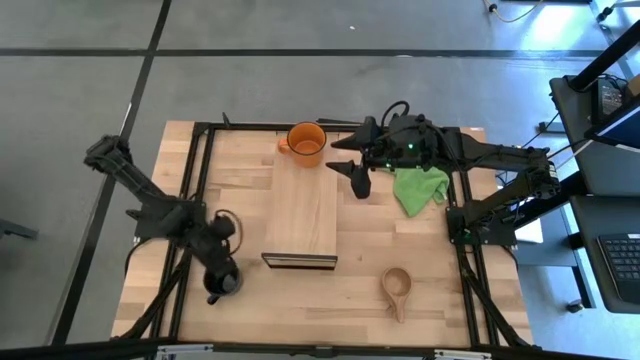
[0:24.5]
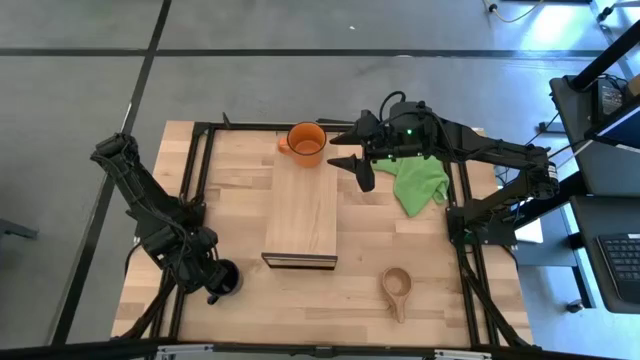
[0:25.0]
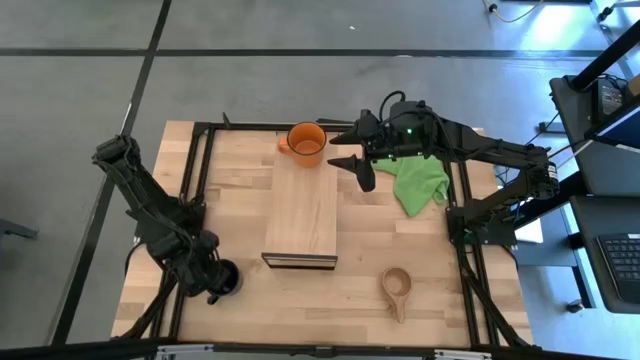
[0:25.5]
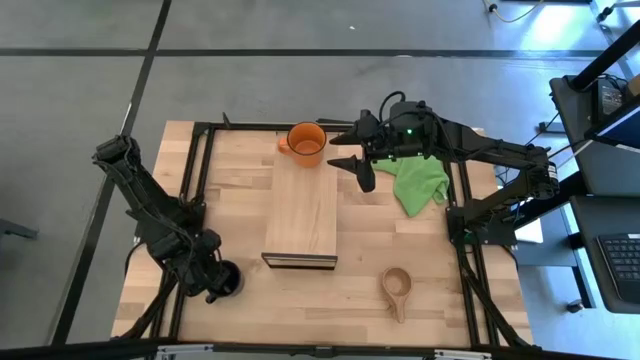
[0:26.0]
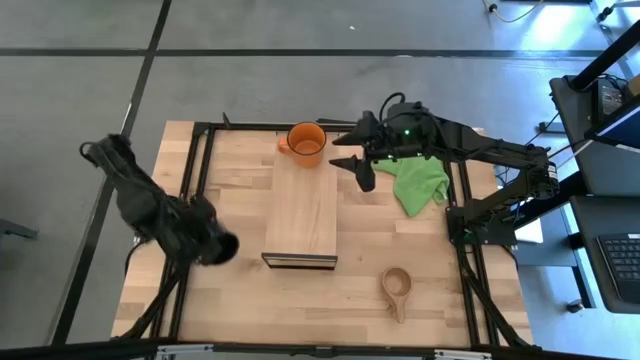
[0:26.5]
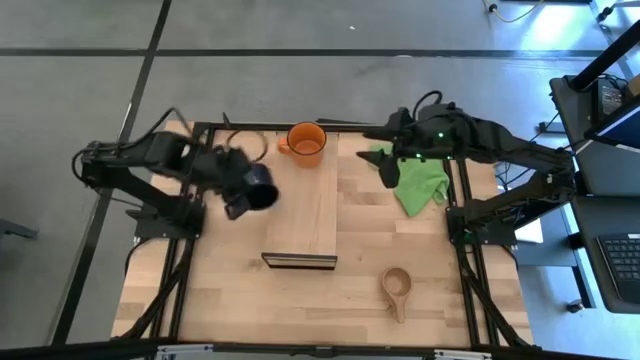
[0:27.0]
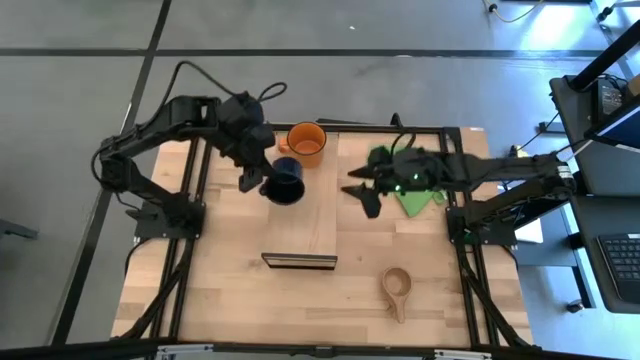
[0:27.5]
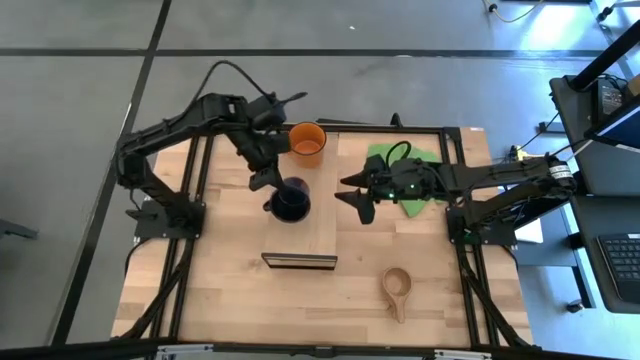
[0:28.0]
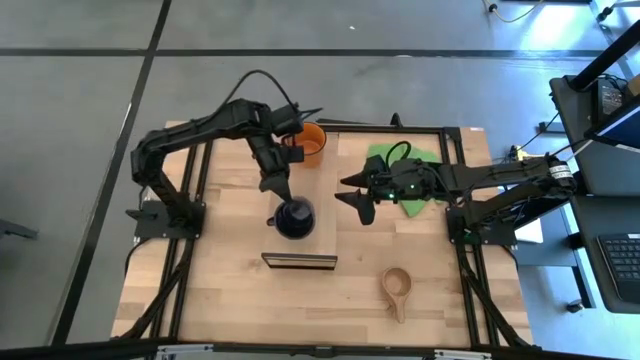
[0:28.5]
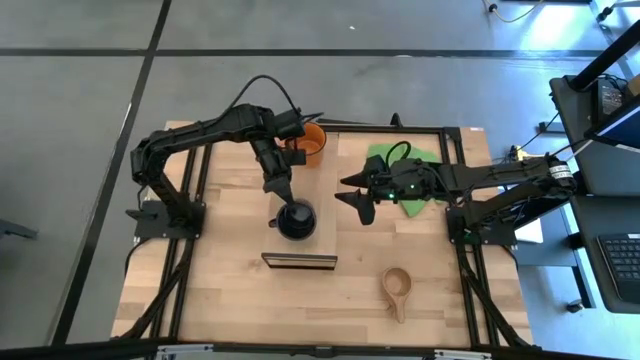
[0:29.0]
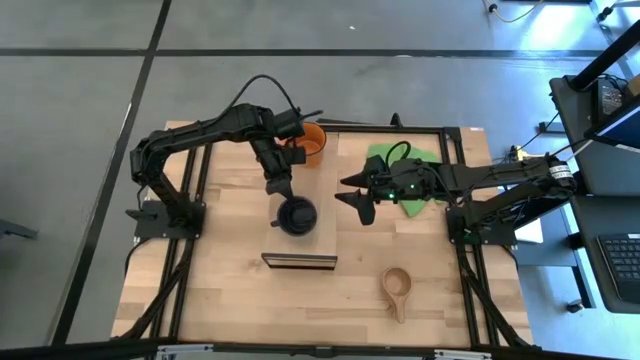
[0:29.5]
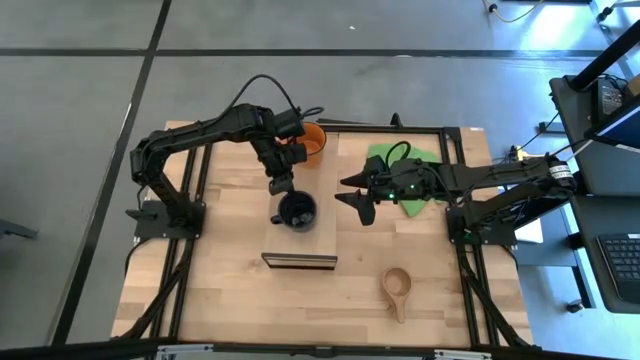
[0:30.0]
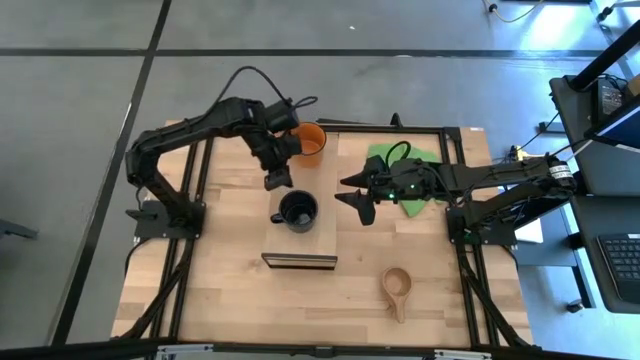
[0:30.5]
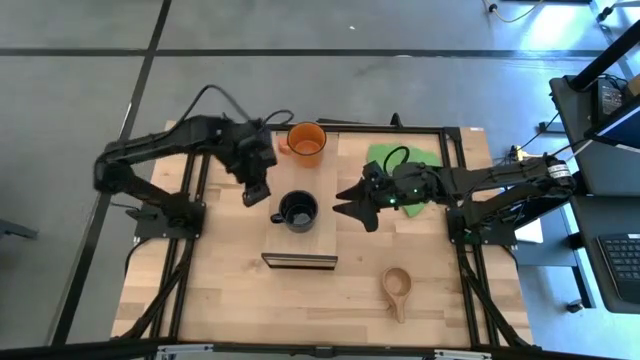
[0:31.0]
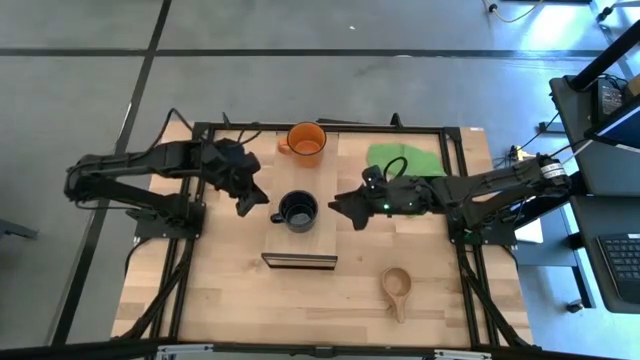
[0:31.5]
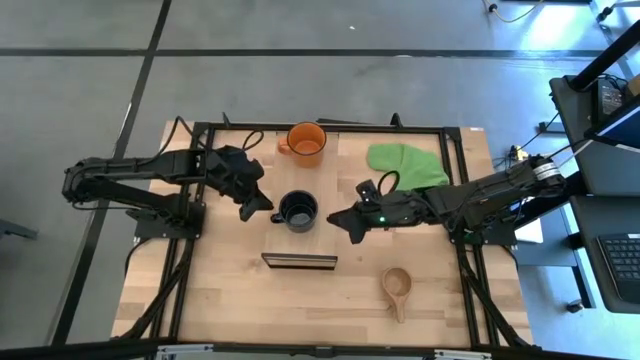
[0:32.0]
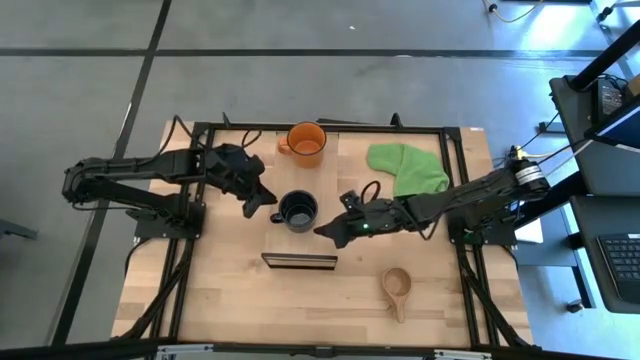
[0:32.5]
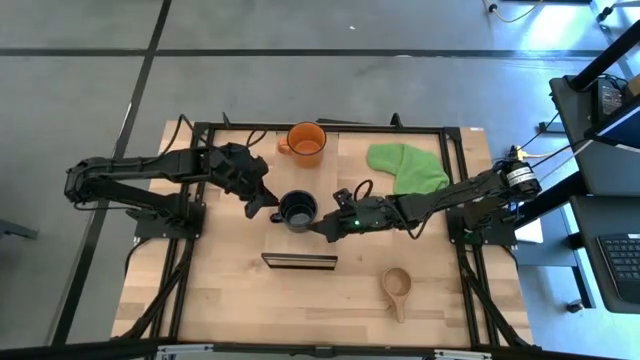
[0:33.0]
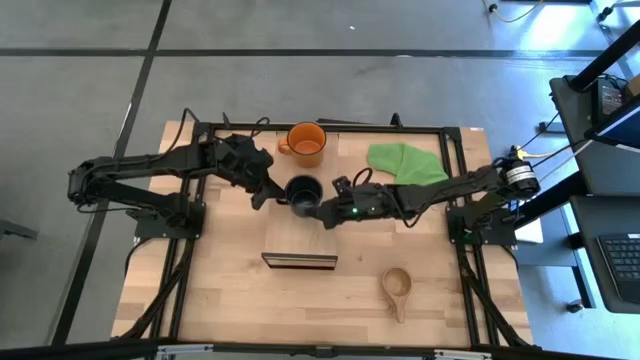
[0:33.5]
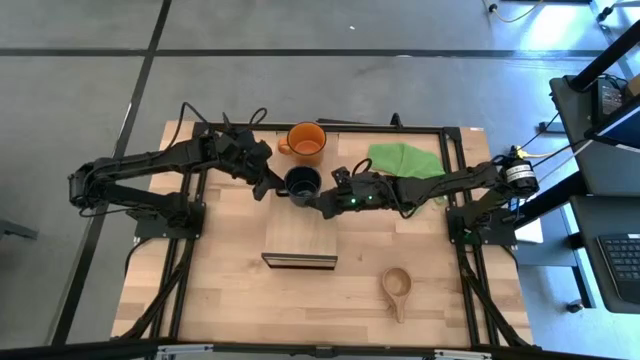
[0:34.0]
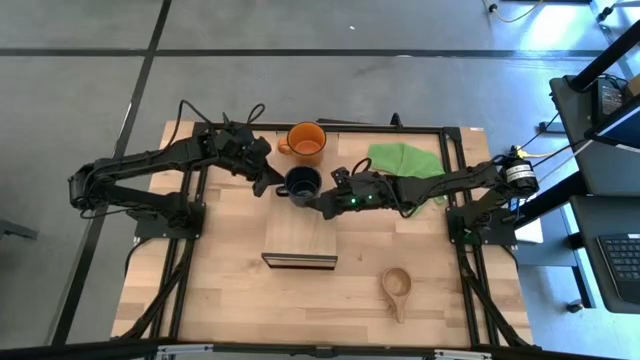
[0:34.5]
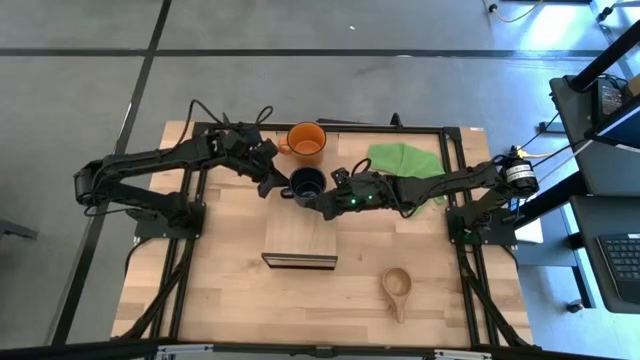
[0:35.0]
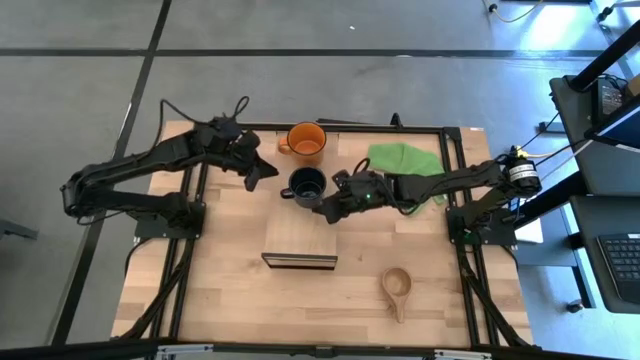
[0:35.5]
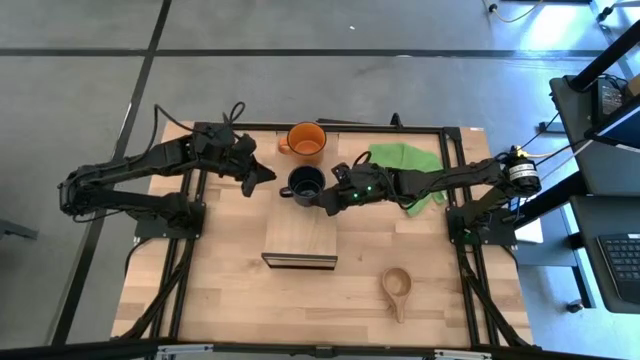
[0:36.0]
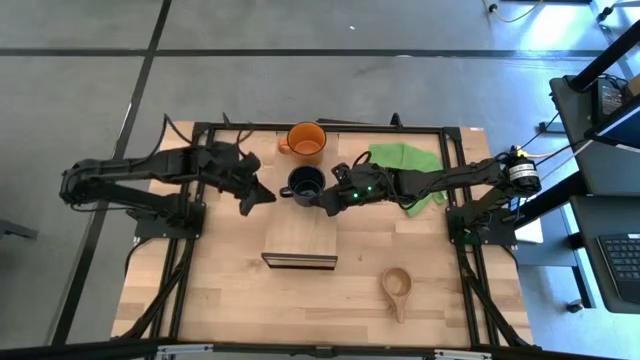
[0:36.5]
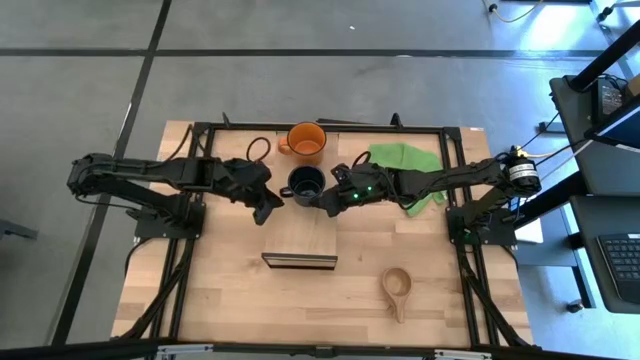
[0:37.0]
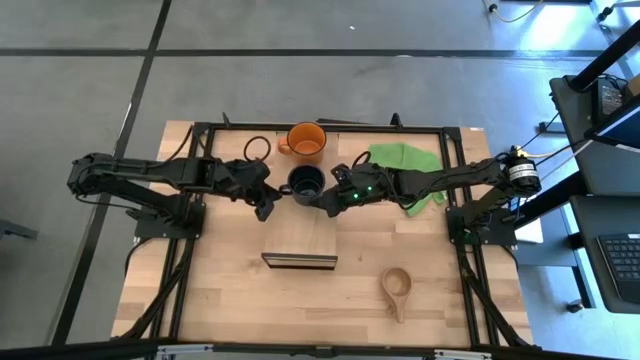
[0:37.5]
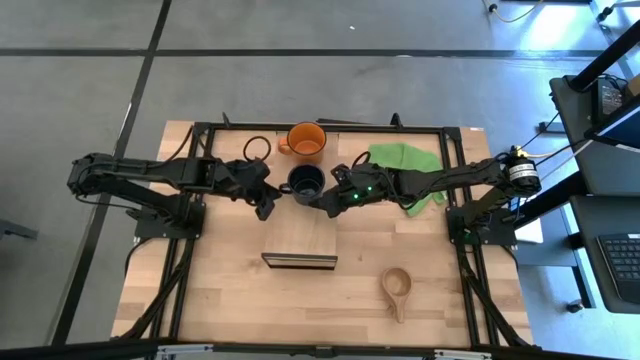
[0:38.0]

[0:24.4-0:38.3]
Task: Stack small to large cups/mugs on shelf
Put the blue mug on the shelf

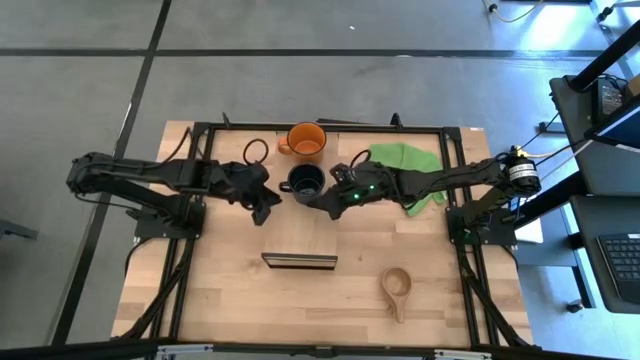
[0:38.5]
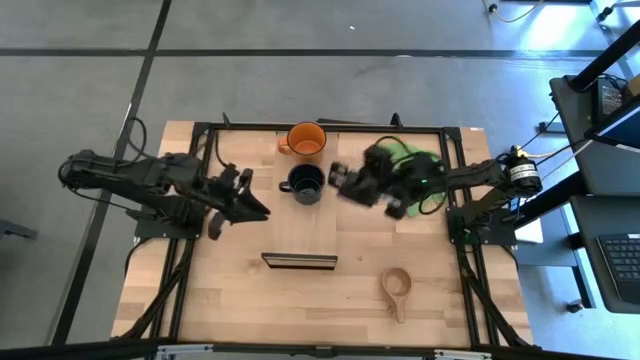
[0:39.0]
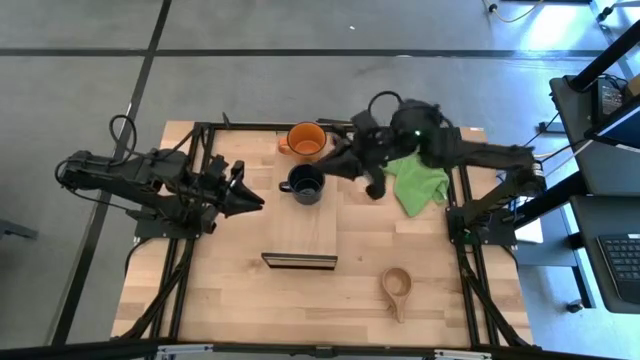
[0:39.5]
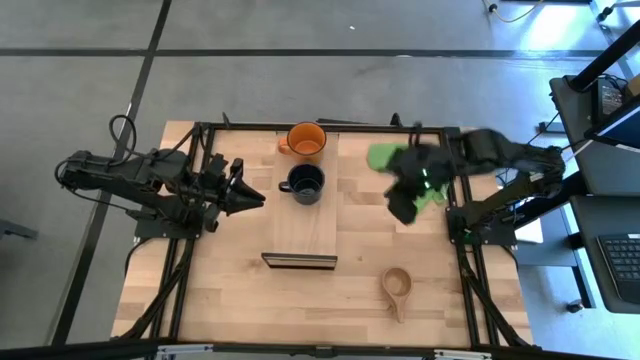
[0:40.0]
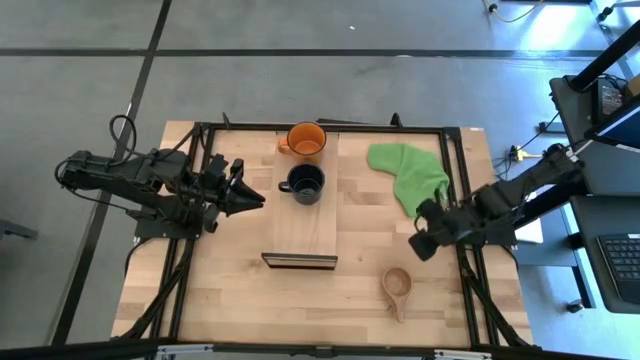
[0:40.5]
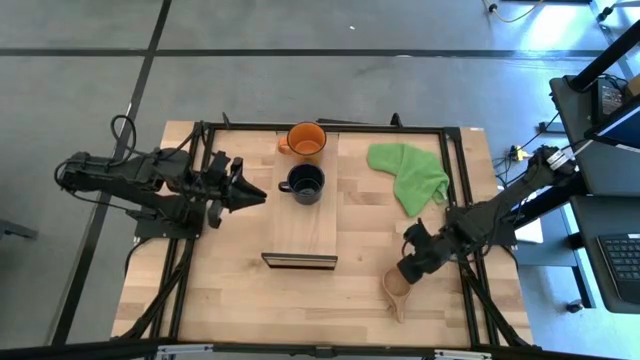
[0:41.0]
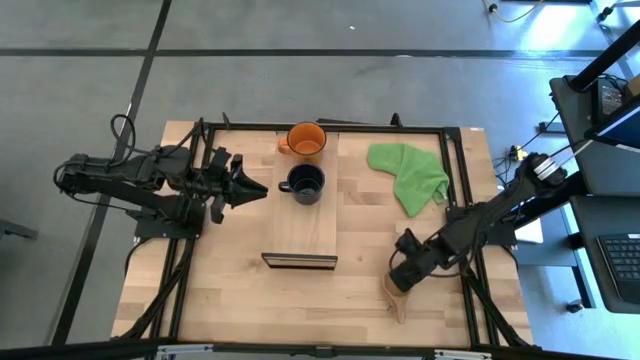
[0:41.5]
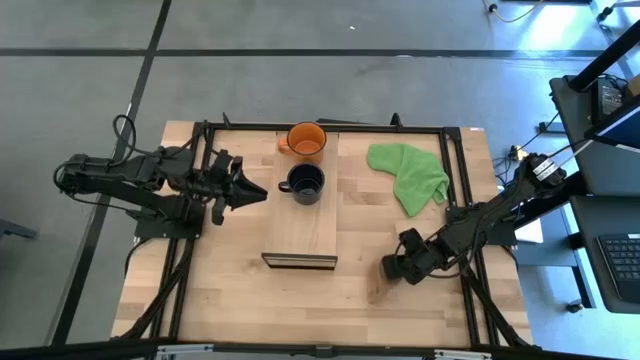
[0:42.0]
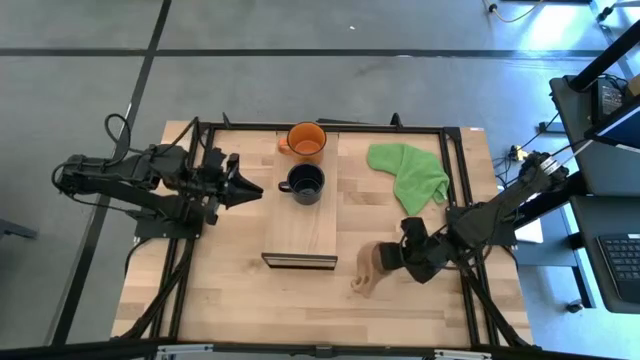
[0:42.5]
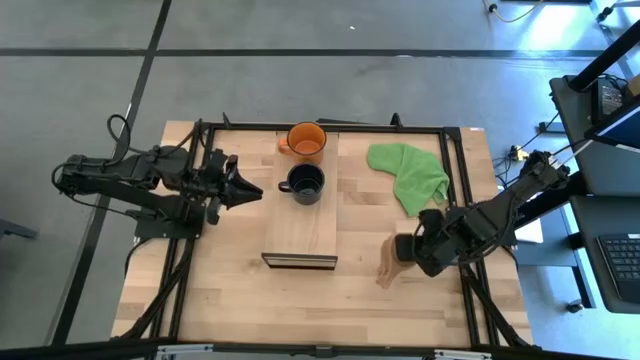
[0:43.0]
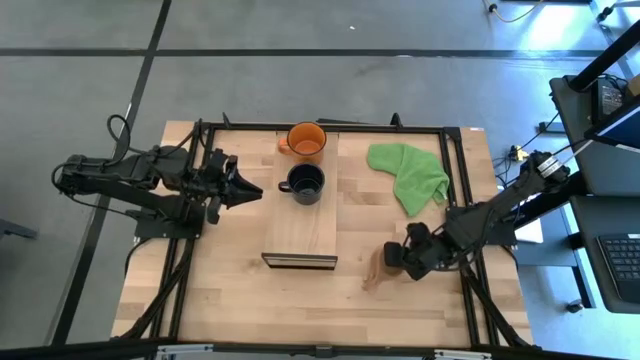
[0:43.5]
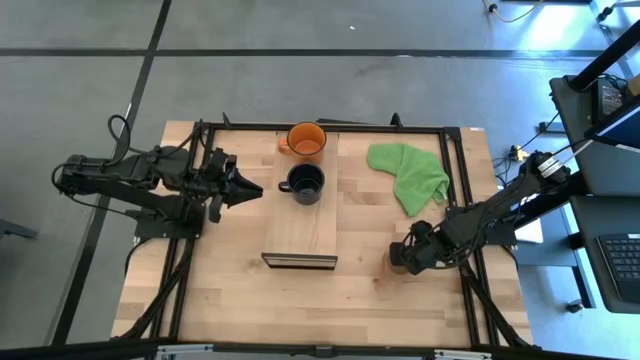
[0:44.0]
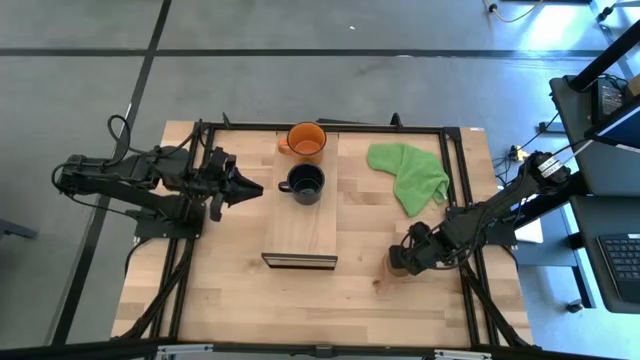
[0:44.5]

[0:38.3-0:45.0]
Put the brown mug on the shelf
